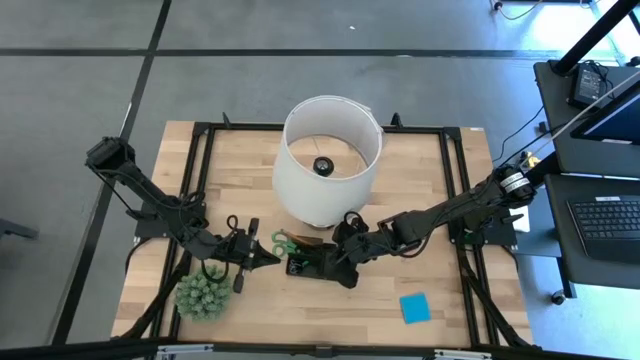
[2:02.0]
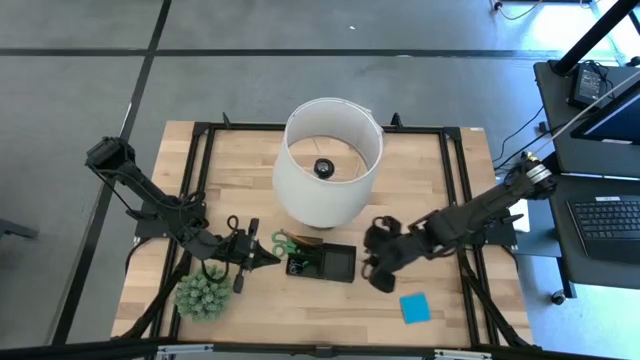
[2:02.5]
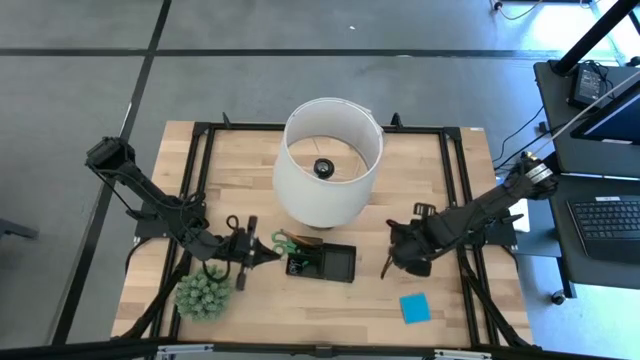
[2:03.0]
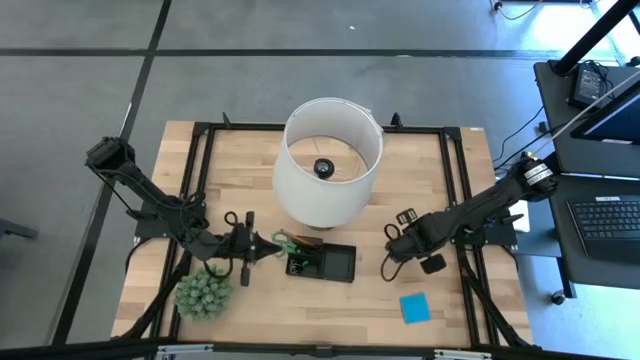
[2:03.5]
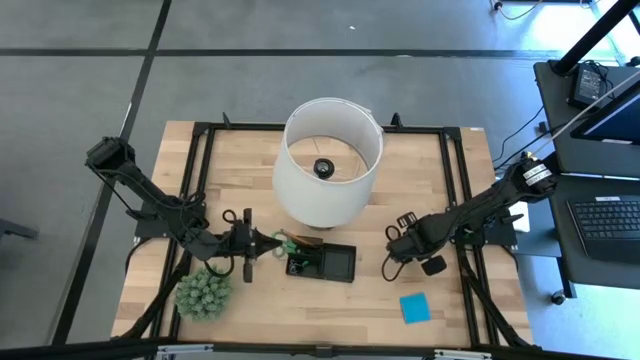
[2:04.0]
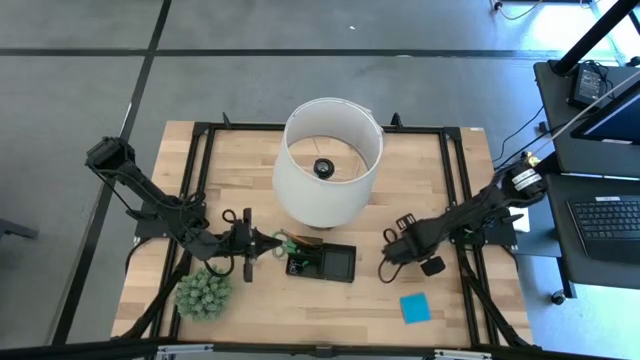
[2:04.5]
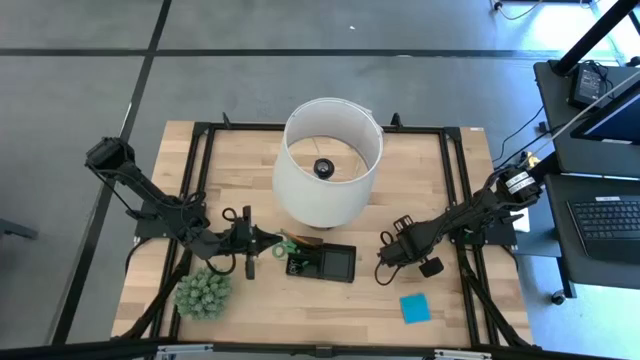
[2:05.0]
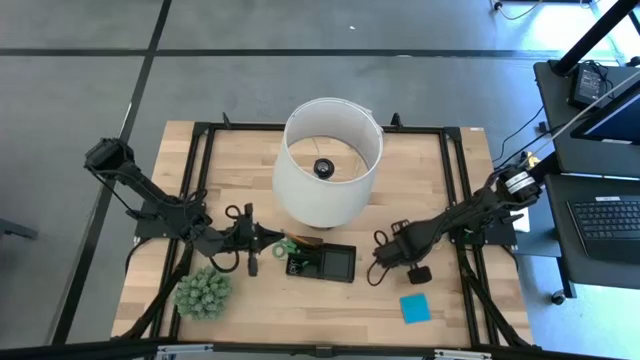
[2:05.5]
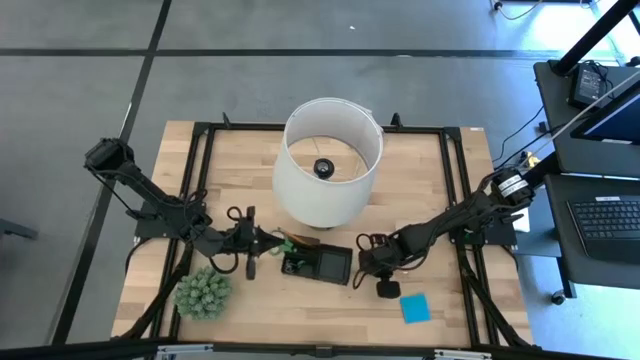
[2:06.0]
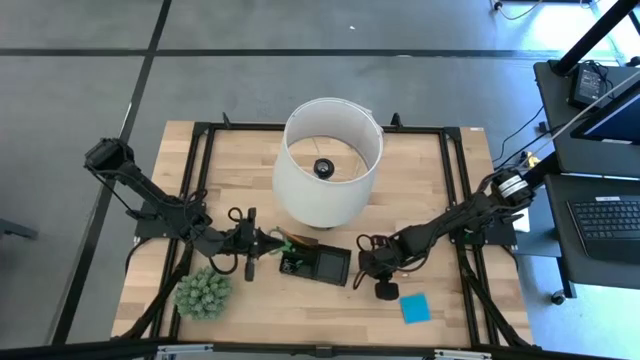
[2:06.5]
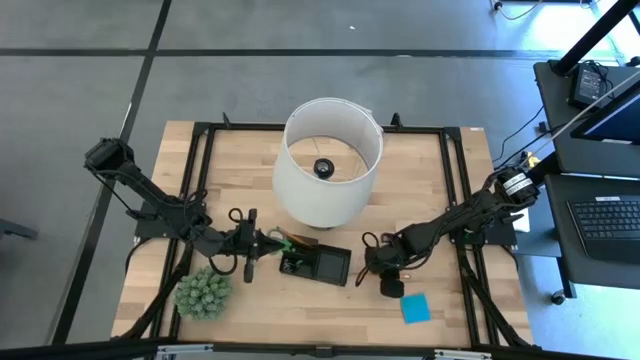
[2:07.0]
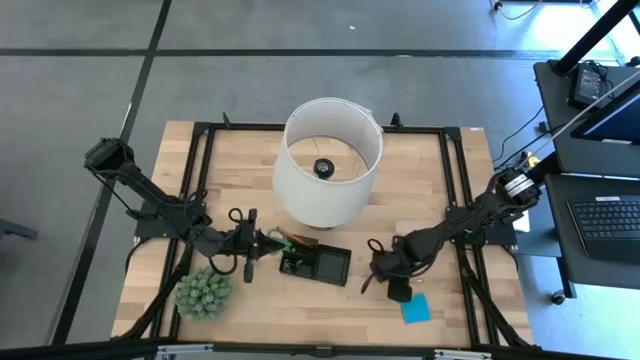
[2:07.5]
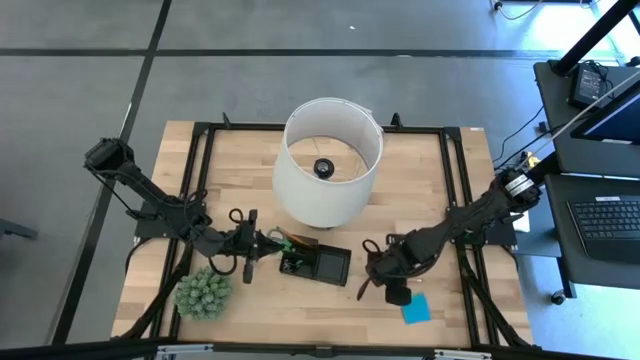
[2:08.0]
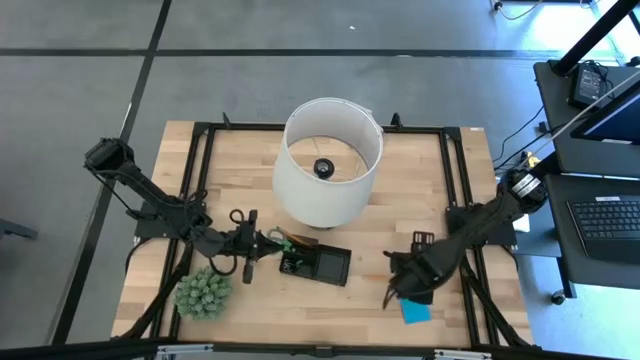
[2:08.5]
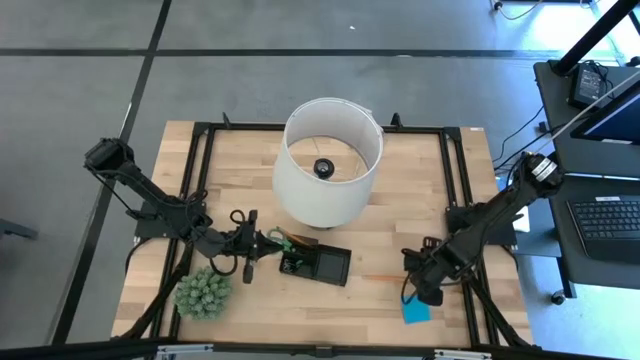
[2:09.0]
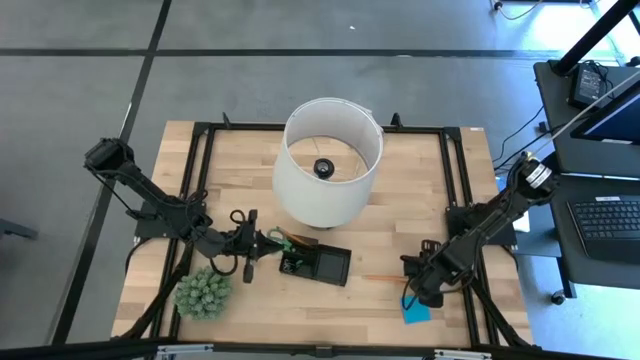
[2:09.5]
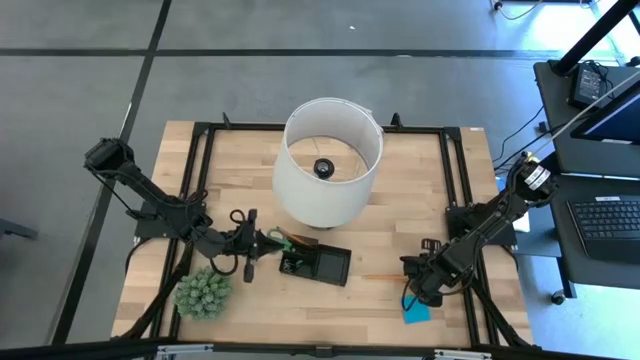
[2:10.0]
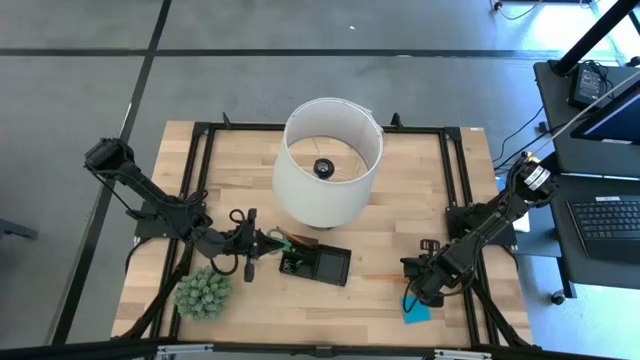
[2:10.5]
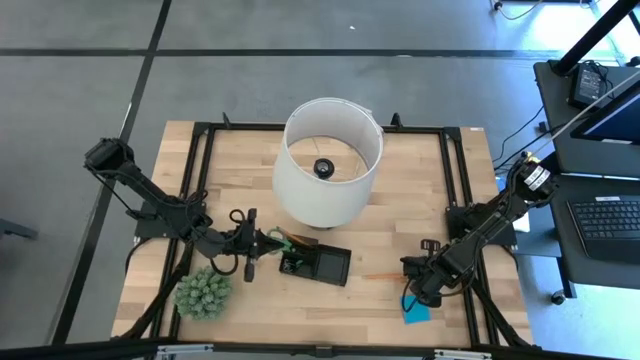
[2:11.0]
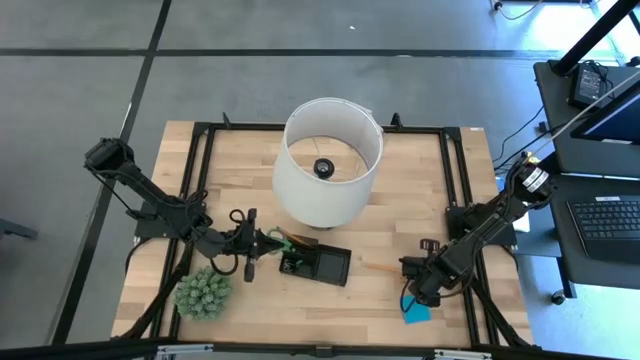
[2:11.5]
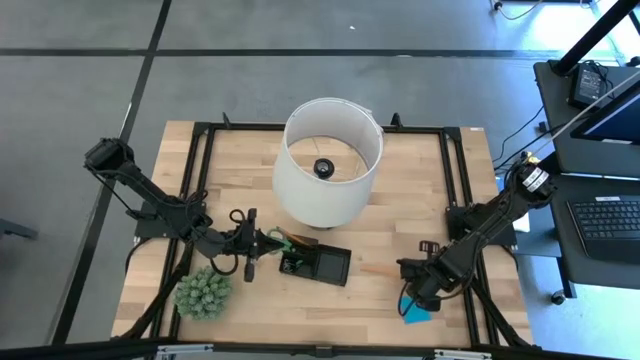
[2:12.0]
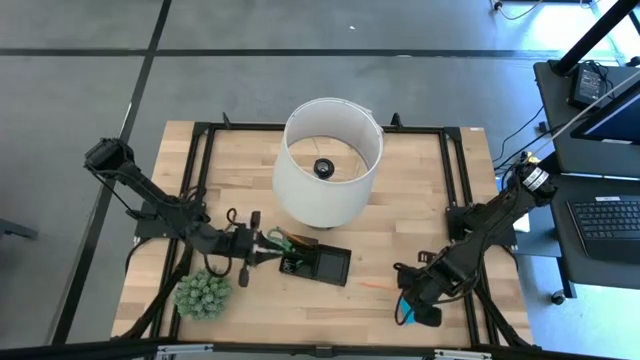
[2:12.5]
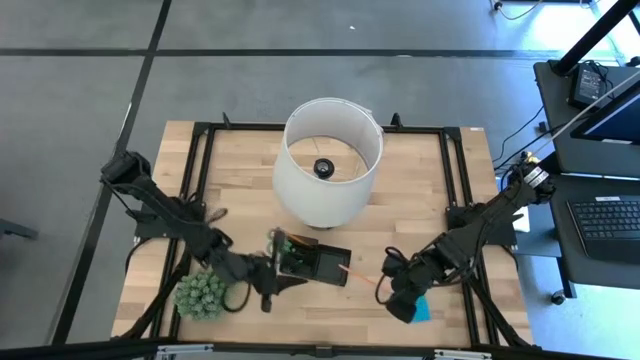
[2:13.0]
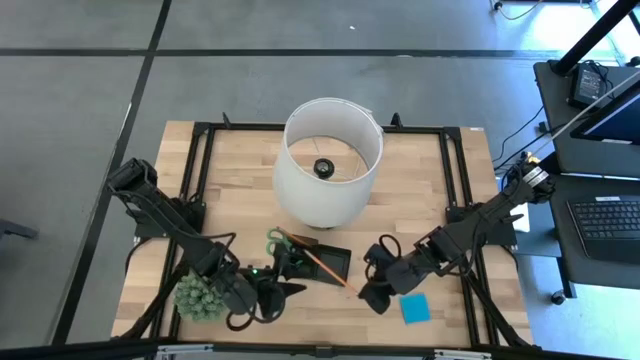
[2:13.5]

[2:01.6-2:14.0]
Task: Pick and place office supplies into organizer
Put the orange pencil into the black desk organizer

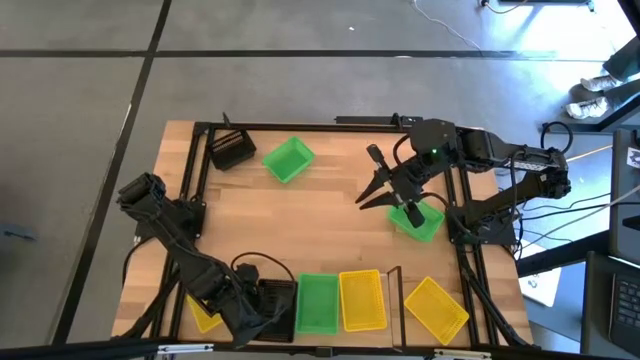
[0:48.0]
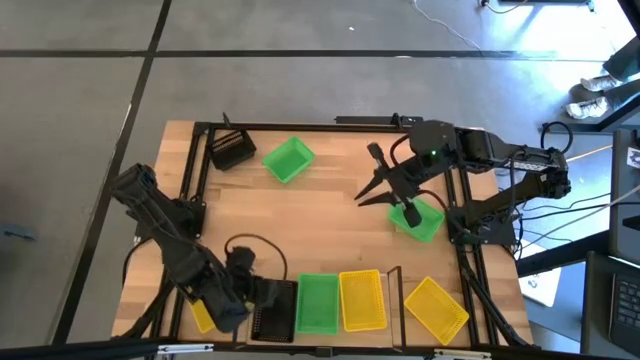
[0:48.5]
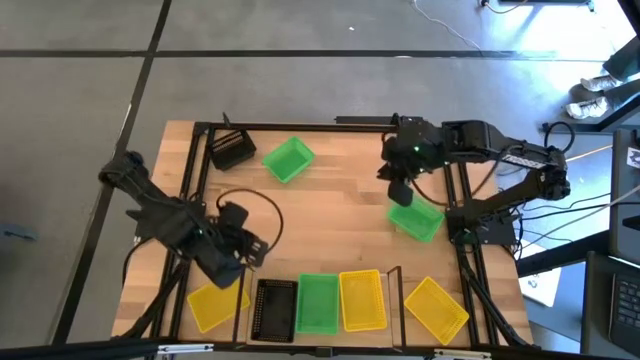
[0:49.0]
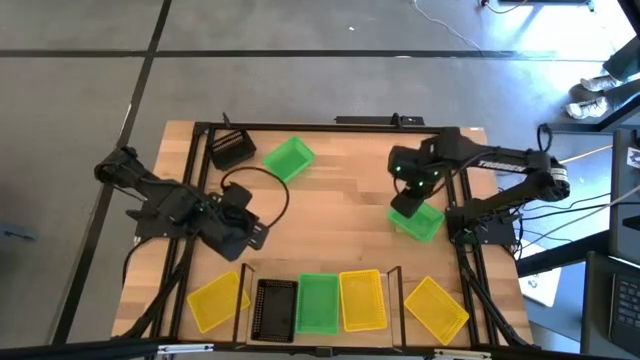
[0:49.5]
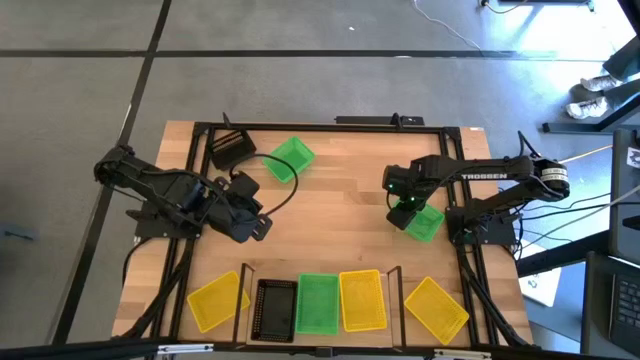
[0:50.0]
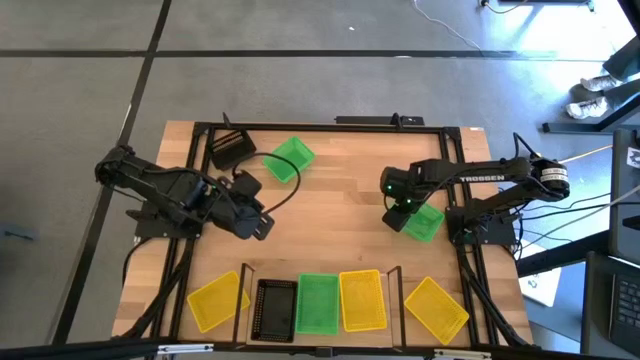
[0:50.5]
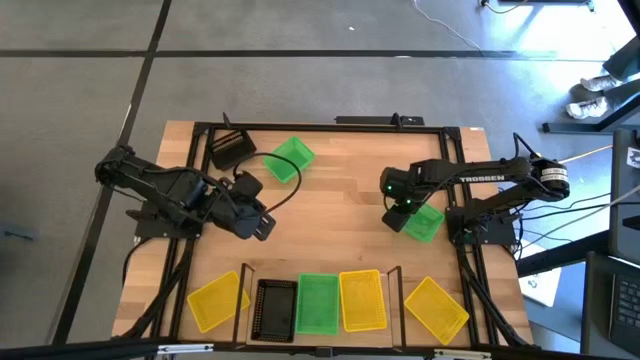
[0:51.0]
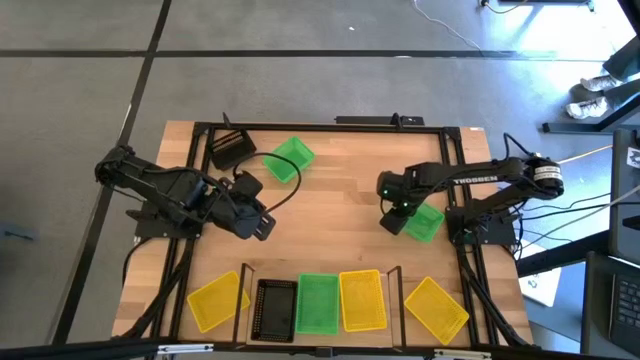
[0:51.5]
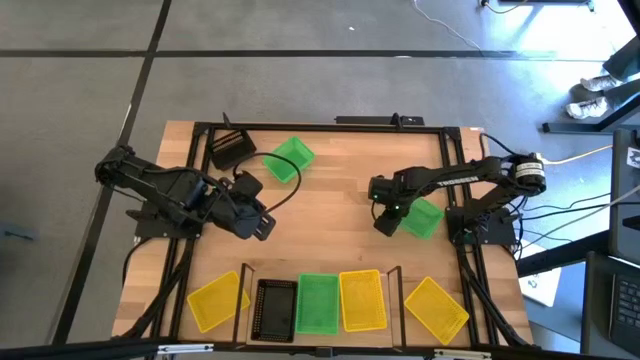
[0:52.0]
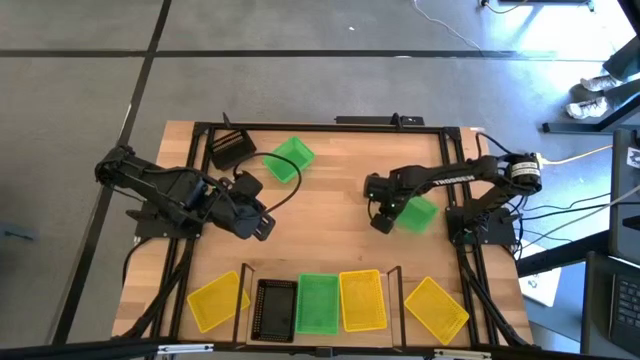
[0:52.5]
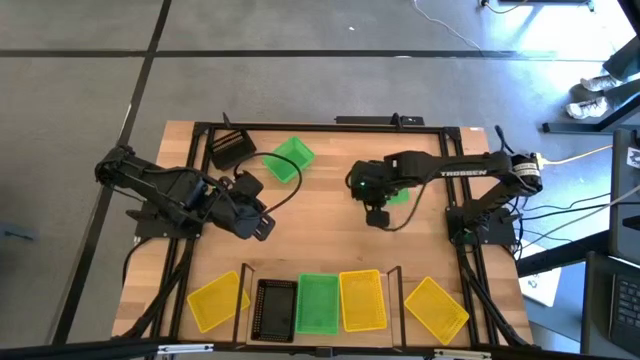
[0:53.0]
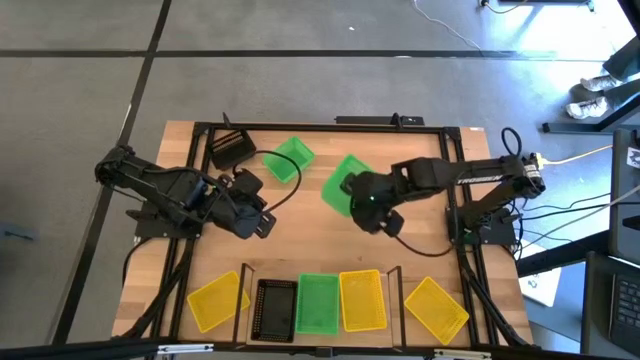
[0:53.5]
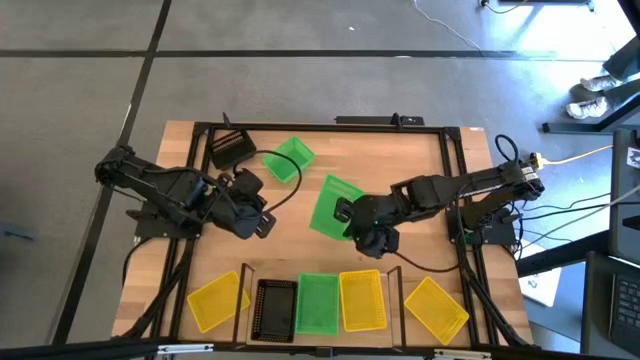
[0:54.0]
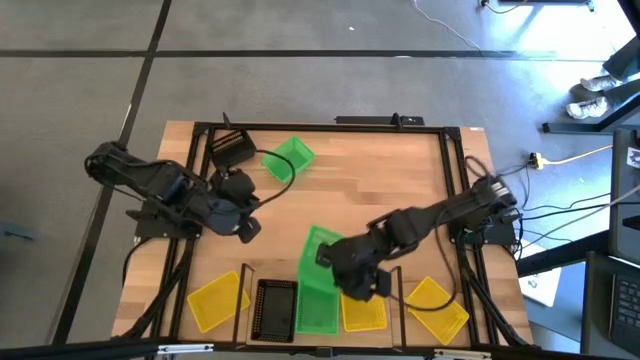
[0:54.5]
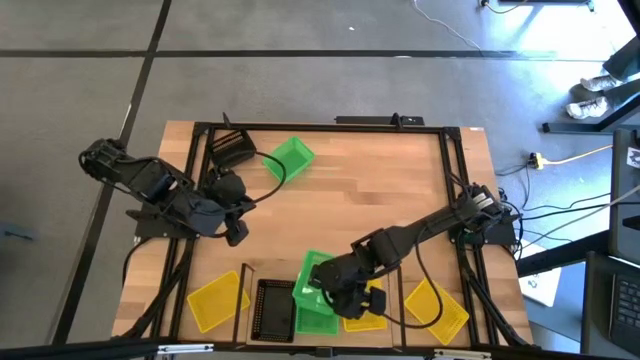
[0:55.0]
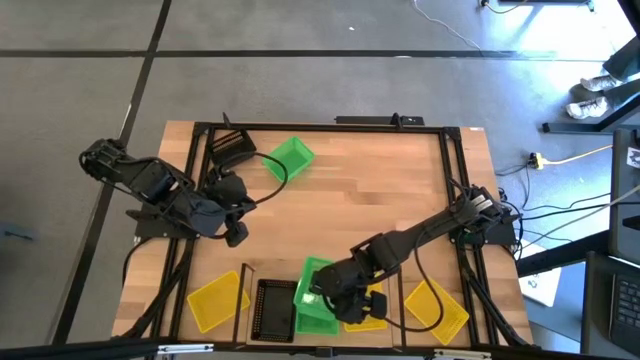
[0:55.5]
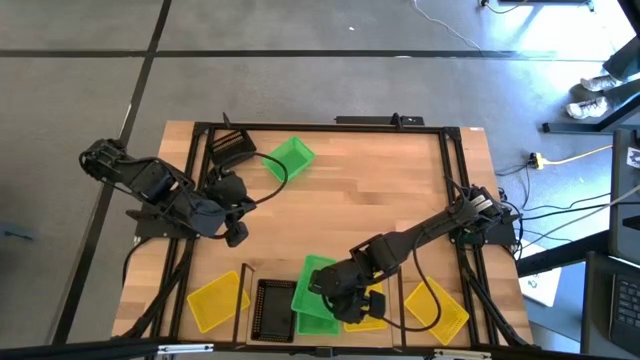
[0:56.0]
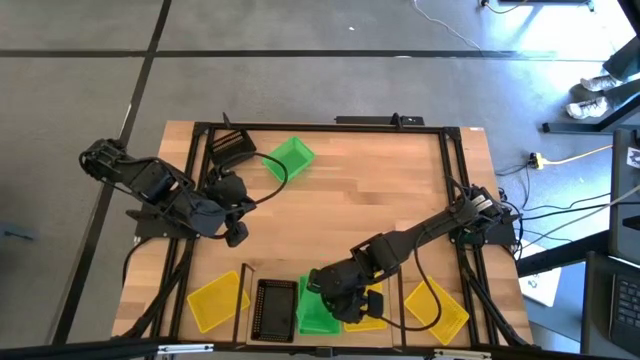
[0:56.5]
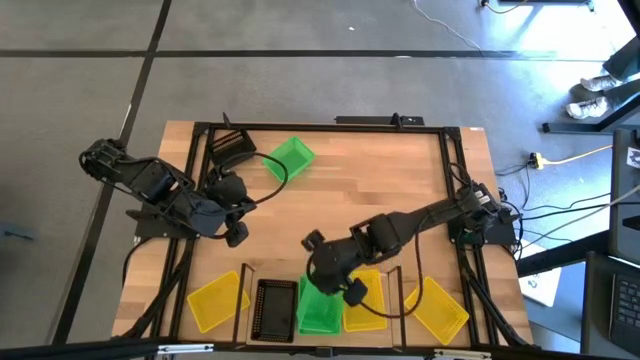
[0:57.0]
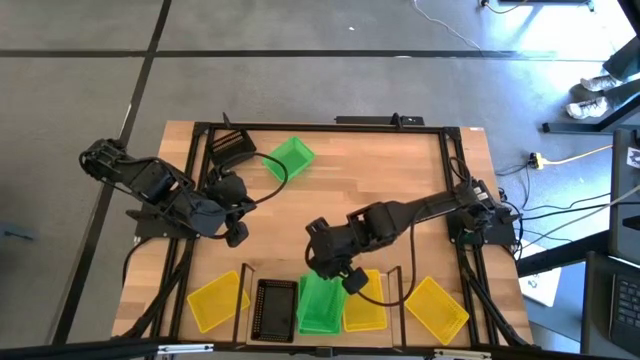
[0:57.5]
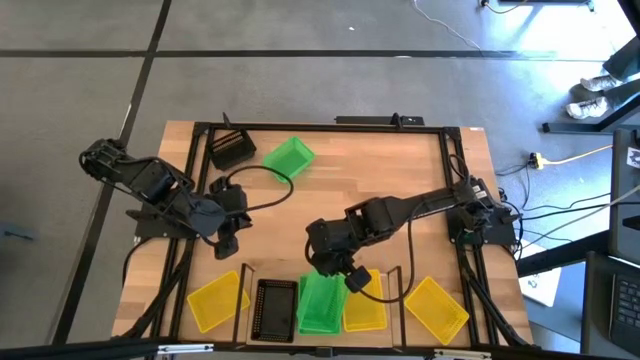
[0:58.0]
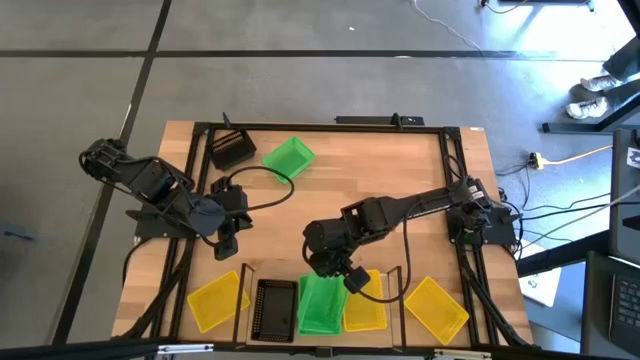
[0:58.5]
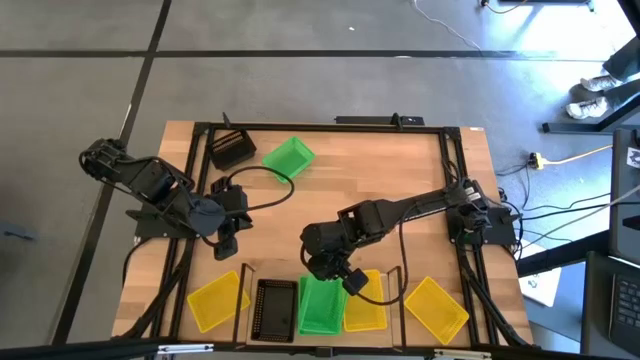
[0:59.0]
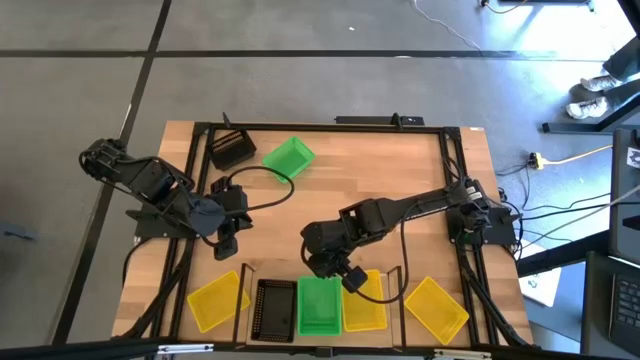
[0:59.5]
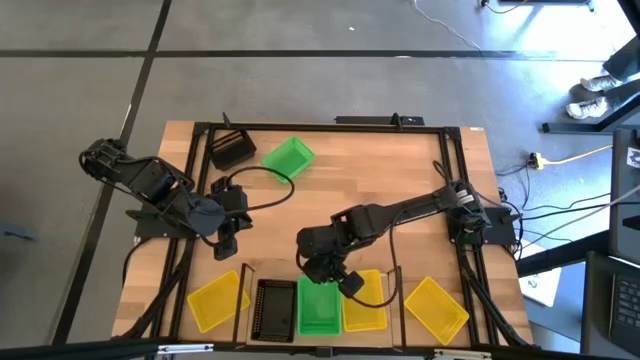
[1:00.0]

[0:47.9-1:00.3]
Task: Stack baskets on shelf by color
Stack the right green basket on top of the green basket on the shelf
